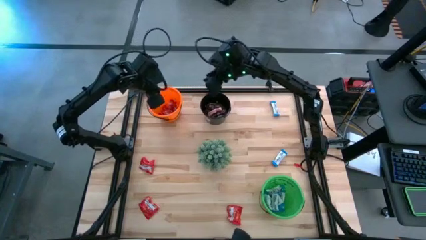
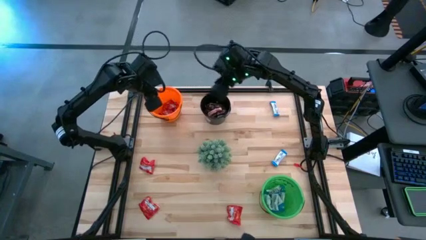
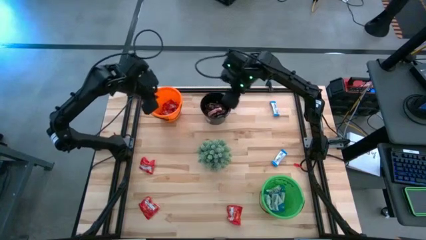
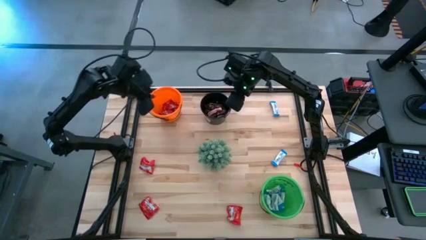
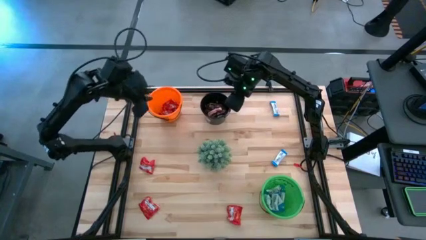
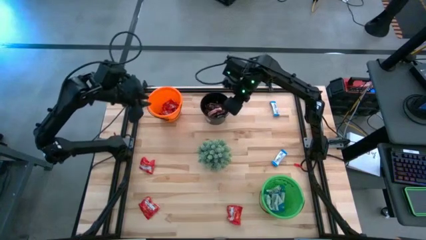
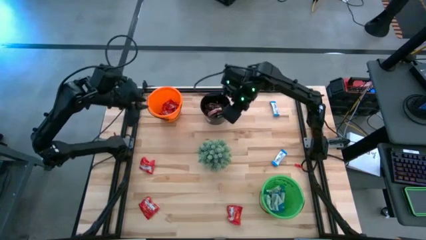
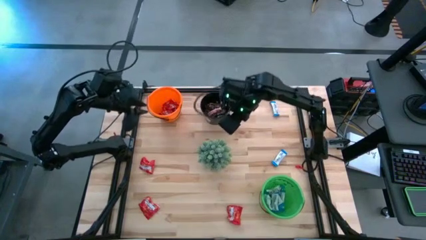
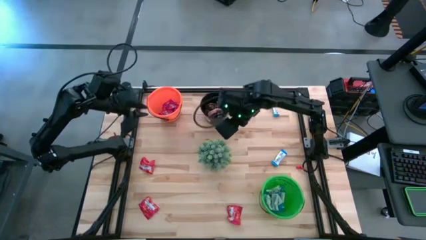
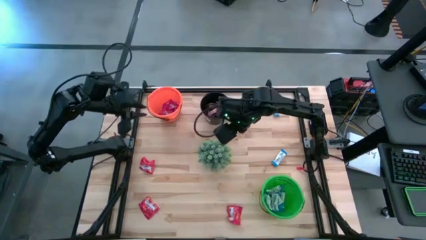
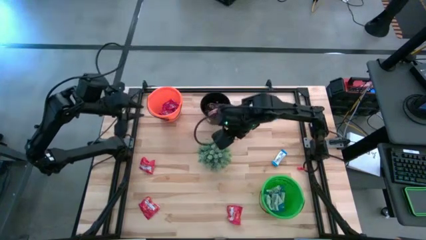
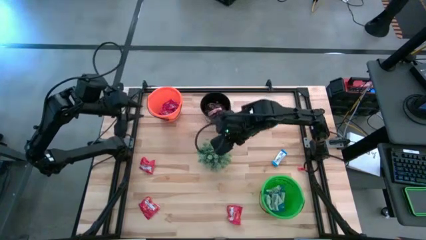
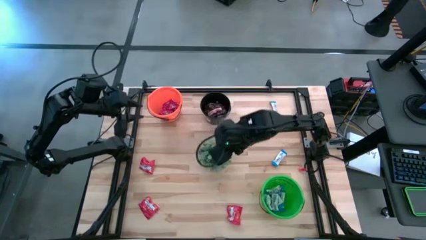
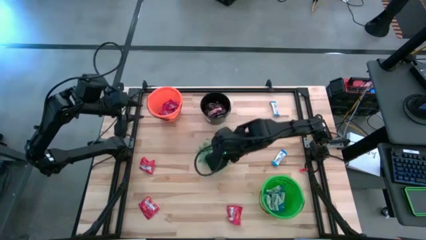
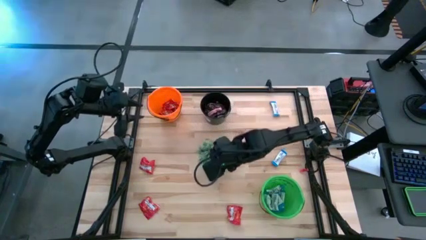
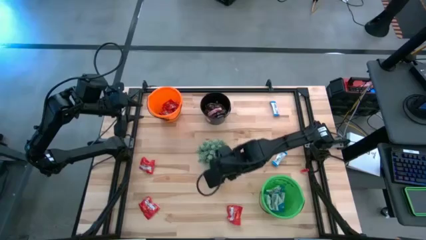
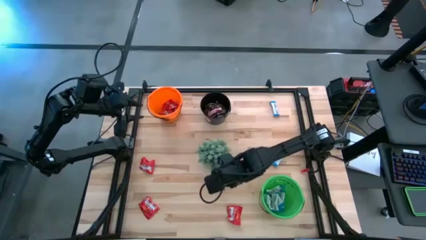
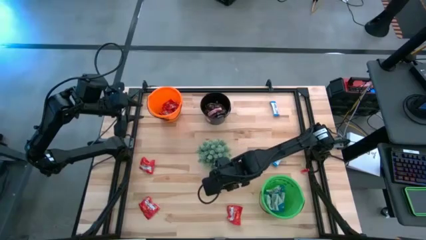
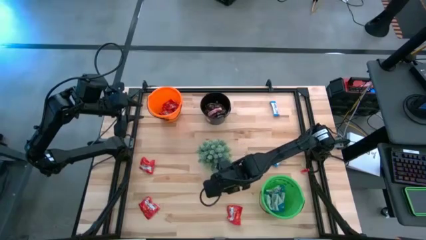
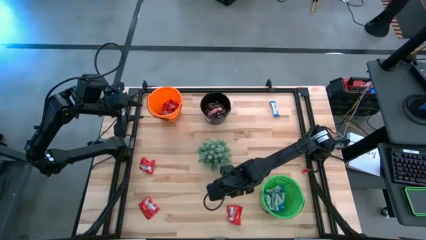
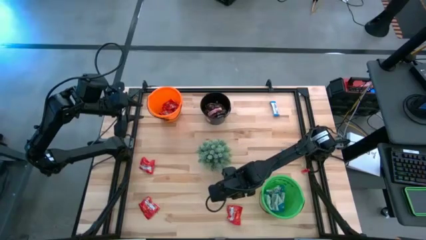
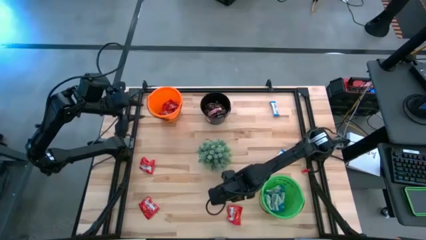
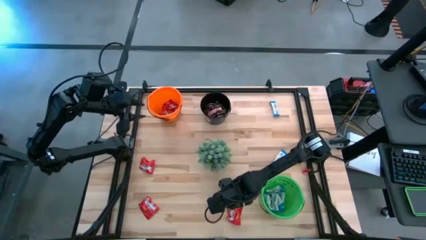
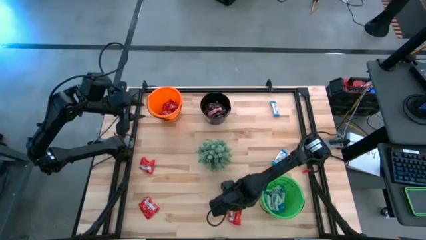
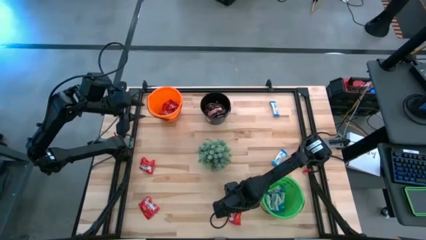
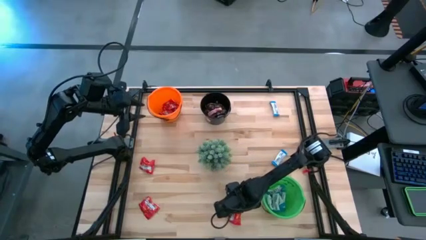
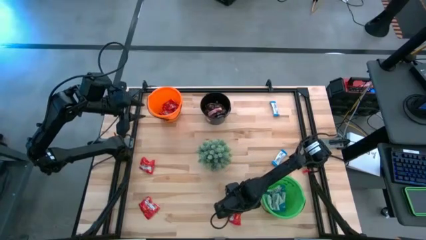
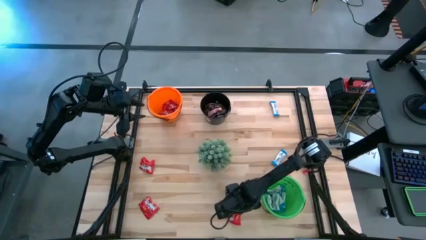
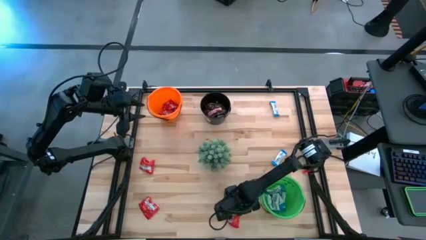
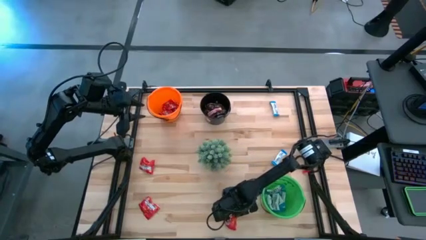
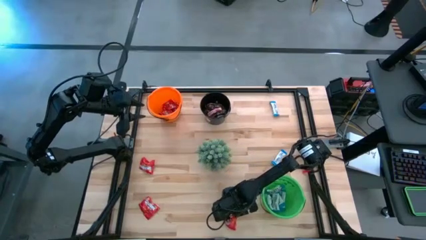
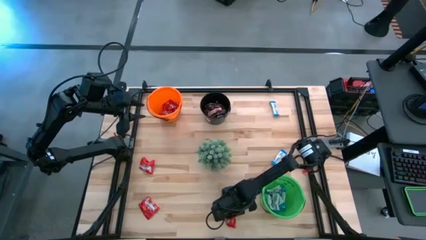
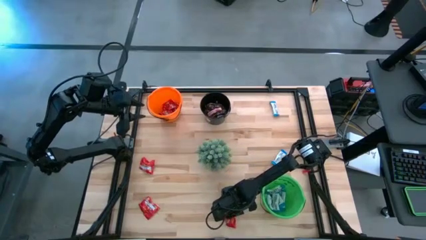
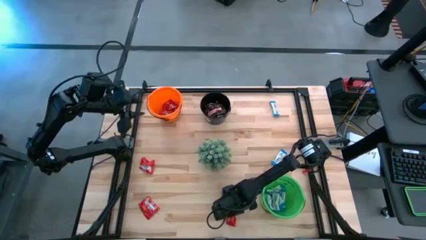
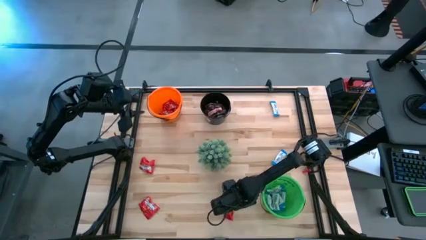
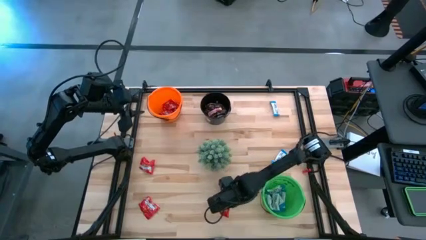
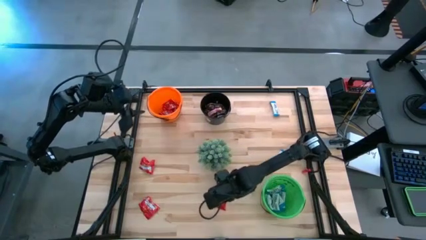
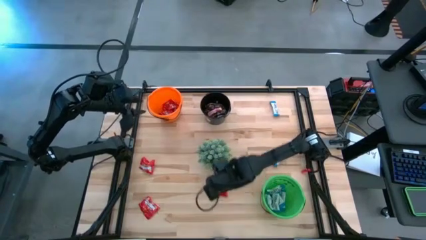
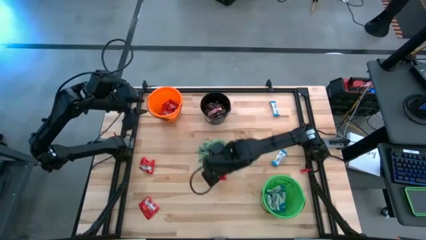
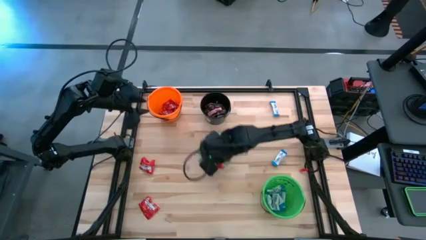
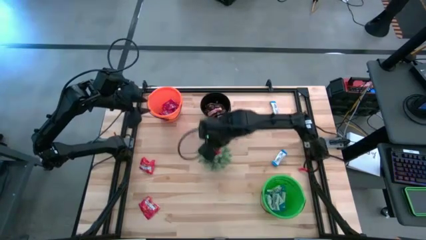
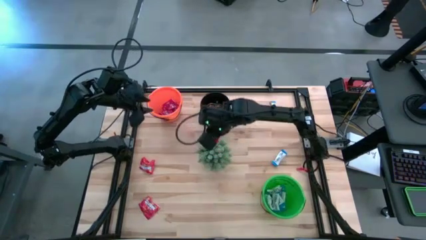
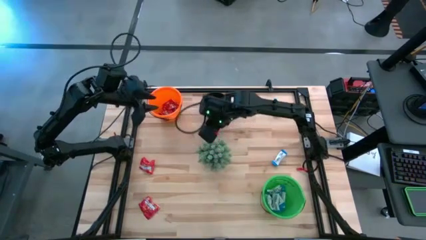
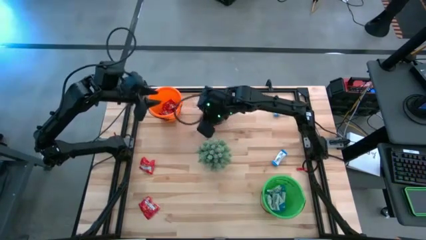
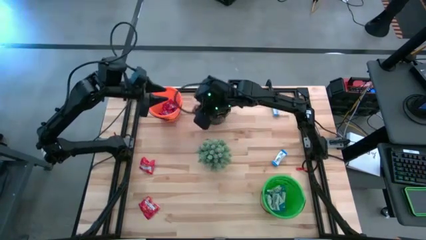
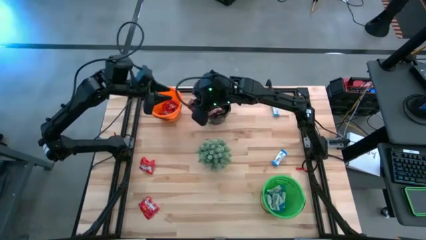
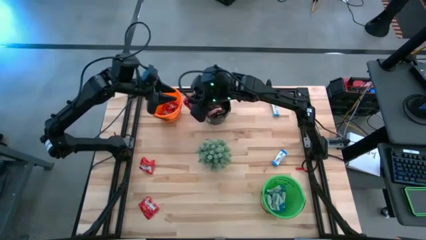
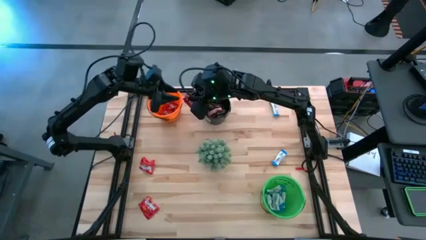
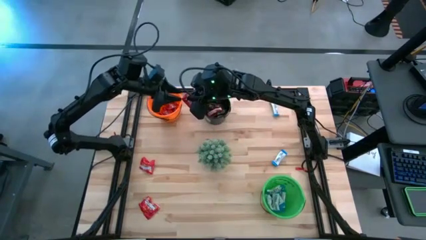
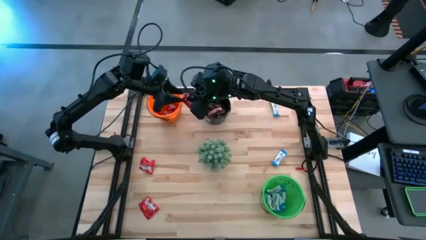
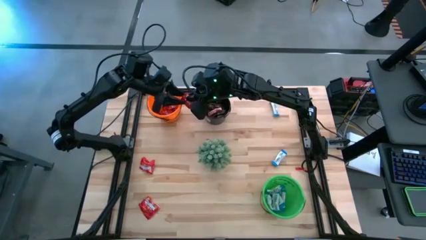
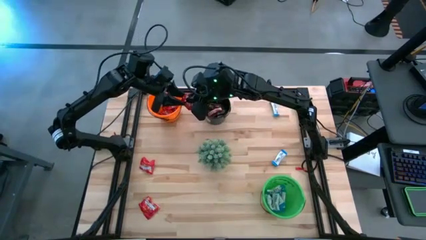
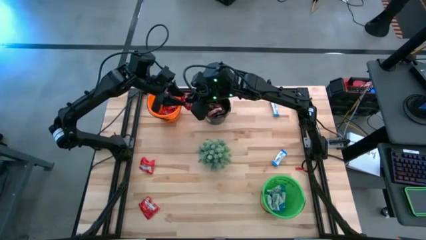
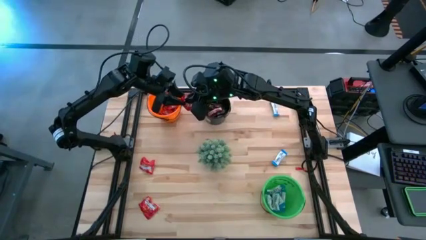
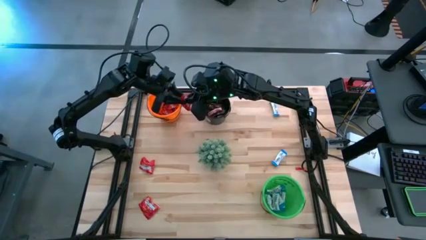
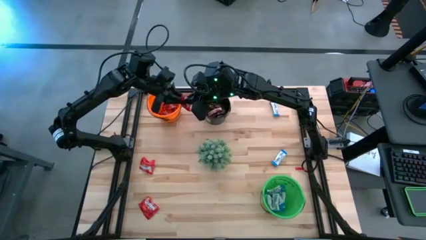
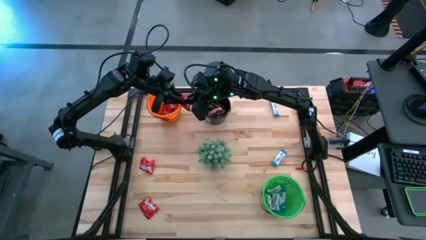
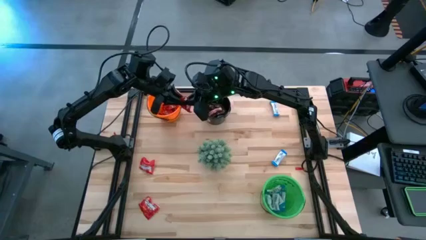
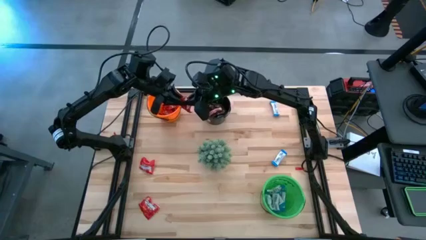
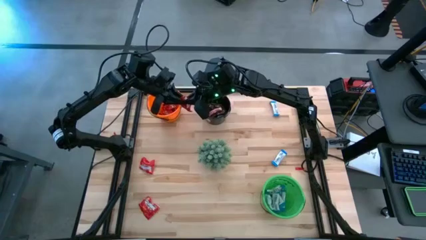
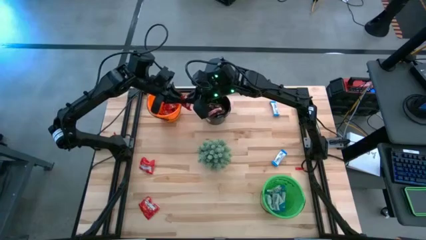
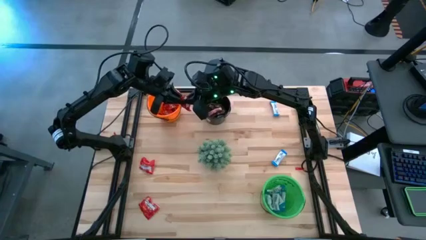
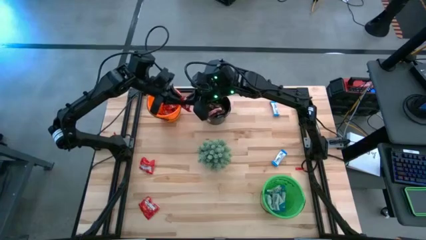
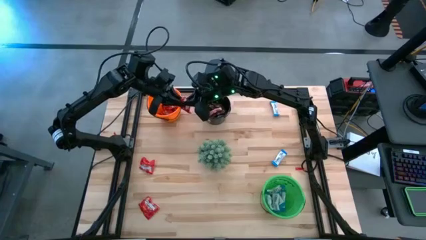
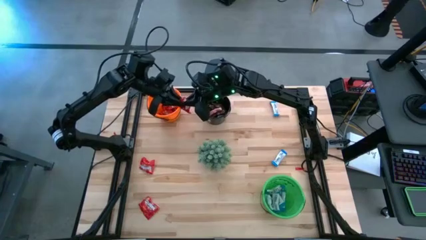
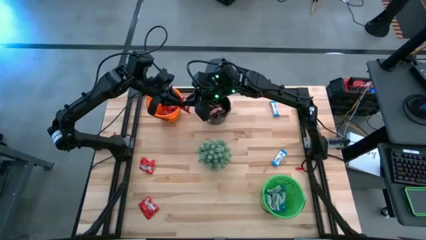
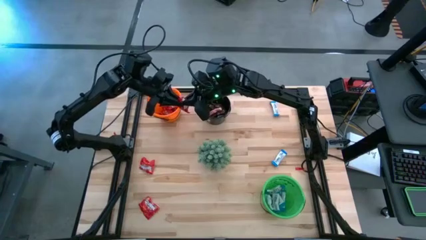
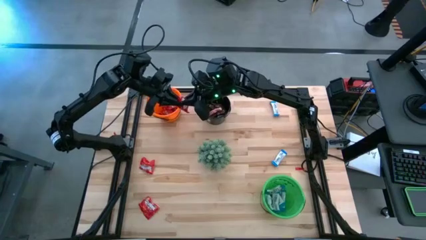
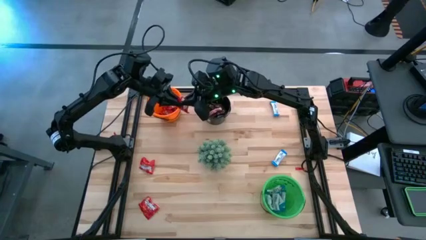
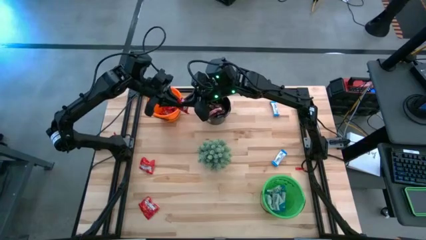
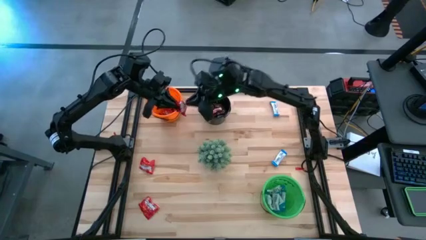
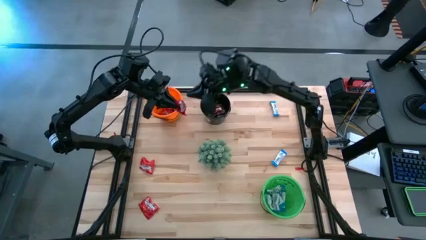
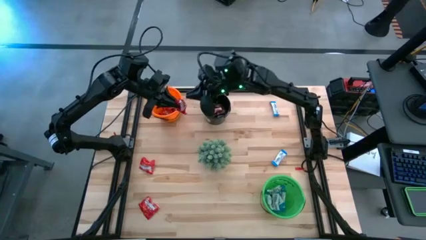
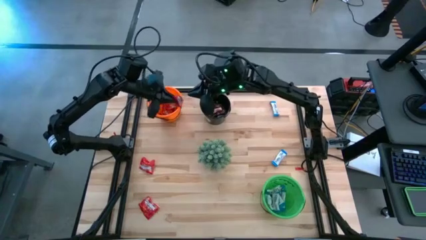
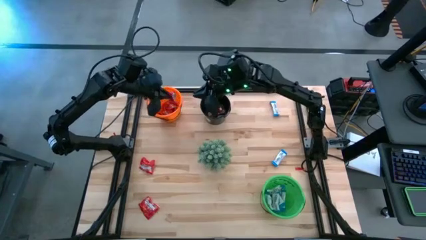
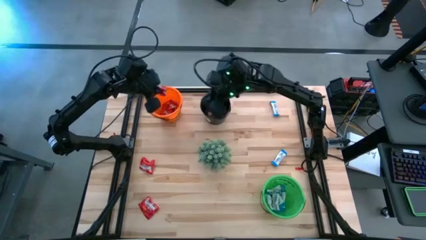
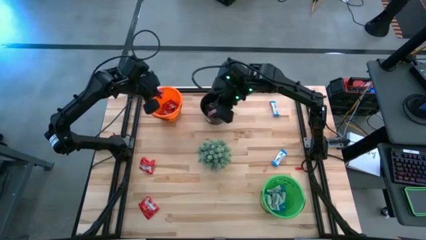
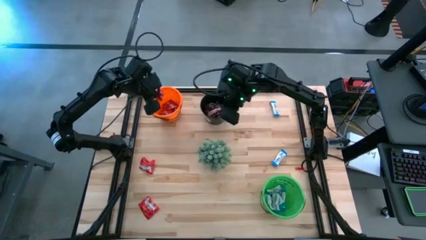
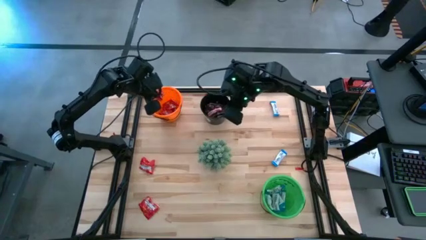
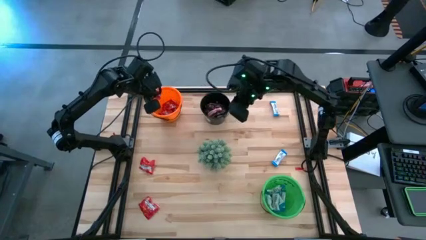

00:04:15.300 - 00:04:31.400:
Task: Sort candy
Put the red candy into the orange bucket
